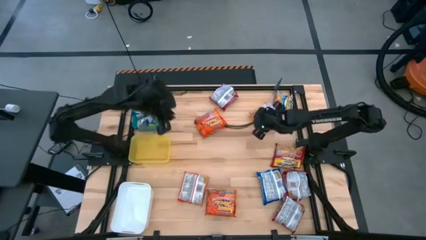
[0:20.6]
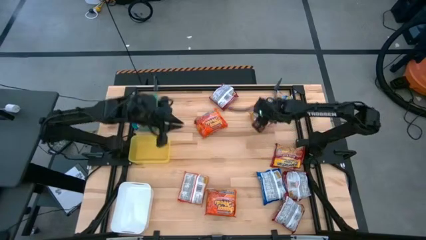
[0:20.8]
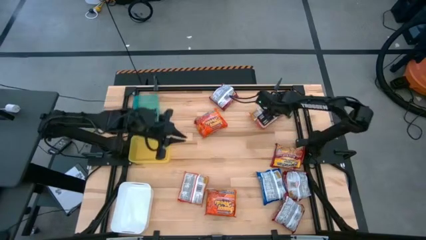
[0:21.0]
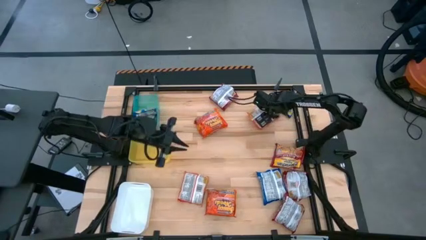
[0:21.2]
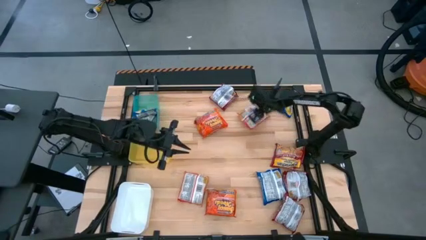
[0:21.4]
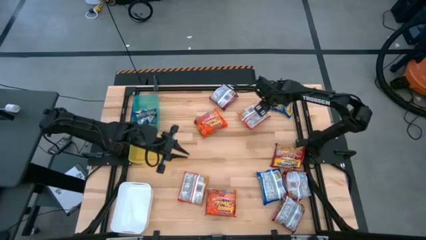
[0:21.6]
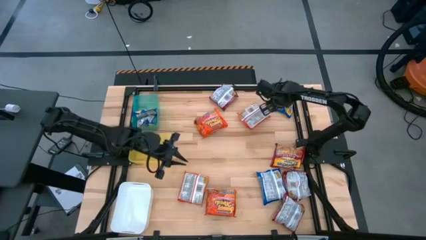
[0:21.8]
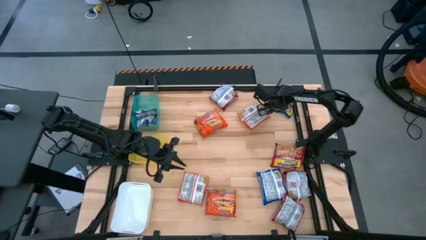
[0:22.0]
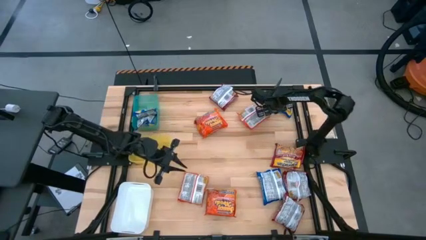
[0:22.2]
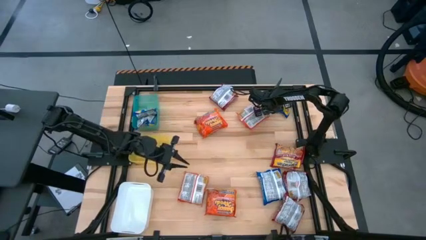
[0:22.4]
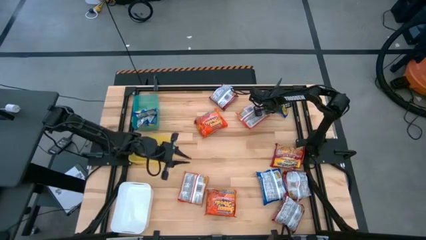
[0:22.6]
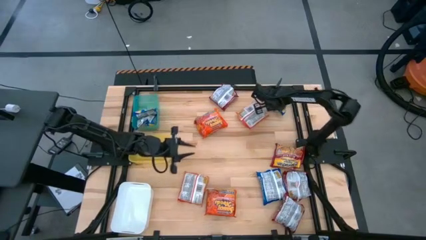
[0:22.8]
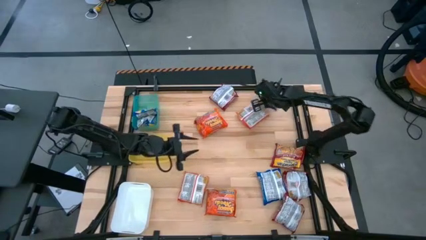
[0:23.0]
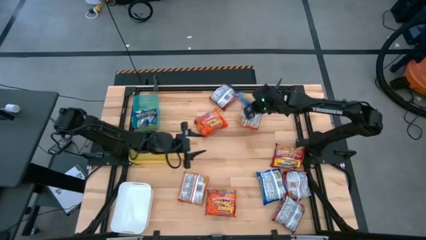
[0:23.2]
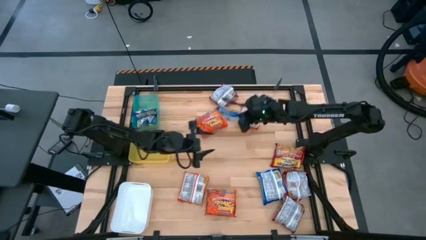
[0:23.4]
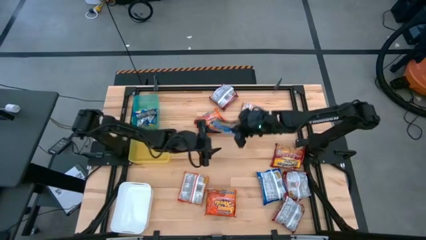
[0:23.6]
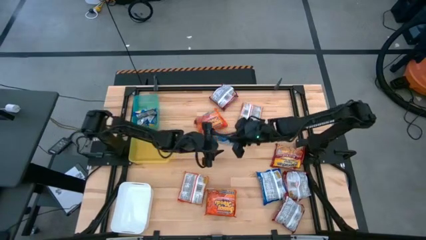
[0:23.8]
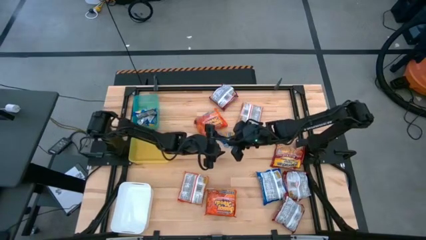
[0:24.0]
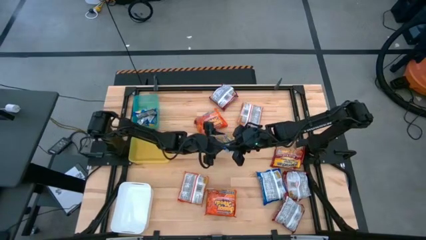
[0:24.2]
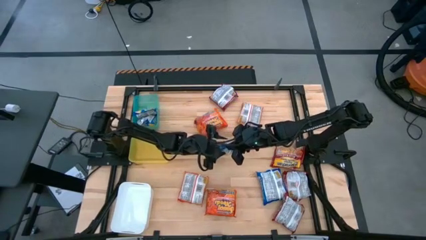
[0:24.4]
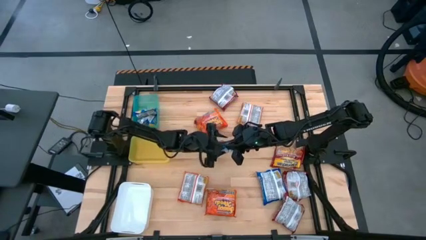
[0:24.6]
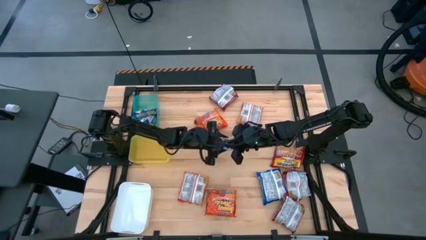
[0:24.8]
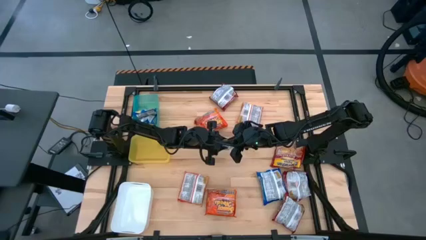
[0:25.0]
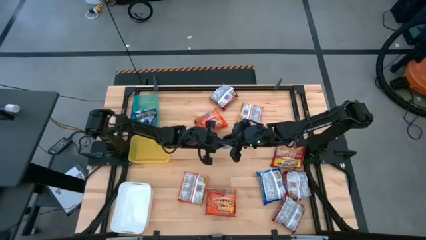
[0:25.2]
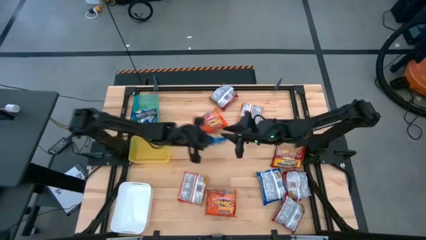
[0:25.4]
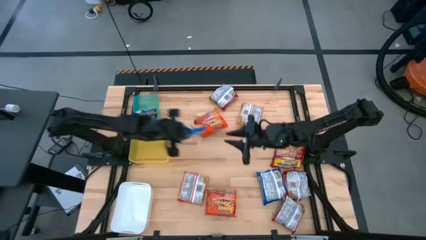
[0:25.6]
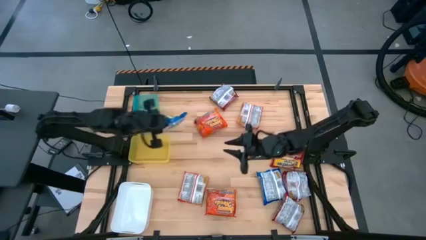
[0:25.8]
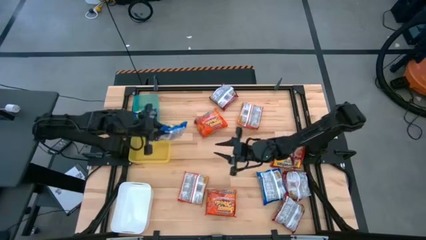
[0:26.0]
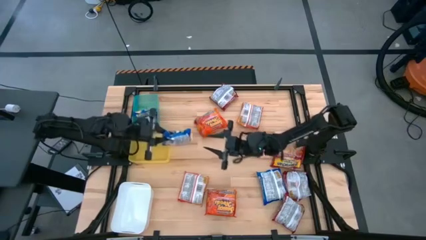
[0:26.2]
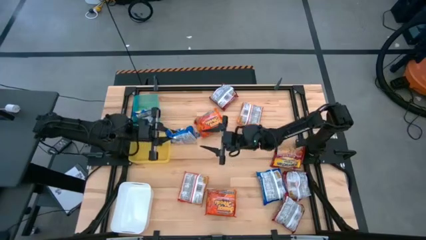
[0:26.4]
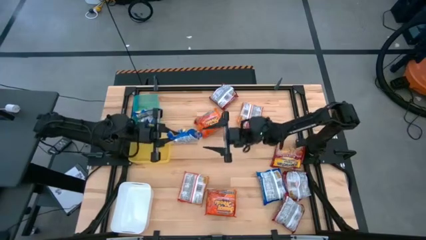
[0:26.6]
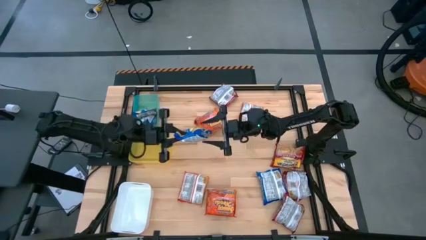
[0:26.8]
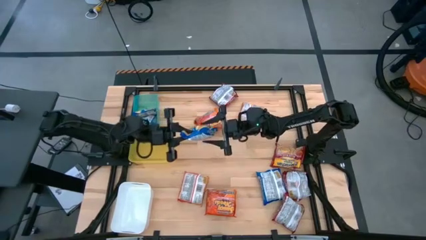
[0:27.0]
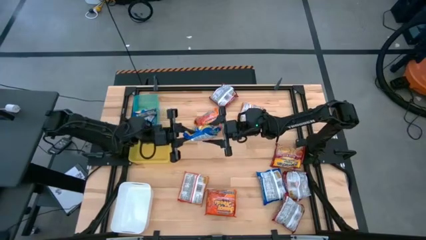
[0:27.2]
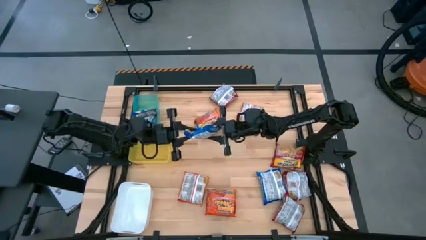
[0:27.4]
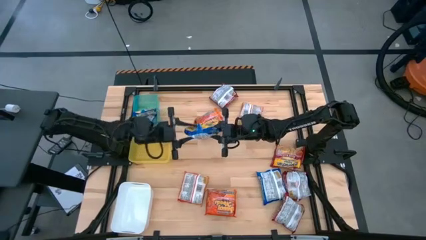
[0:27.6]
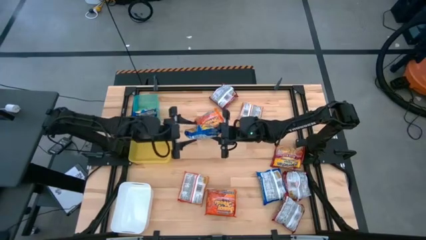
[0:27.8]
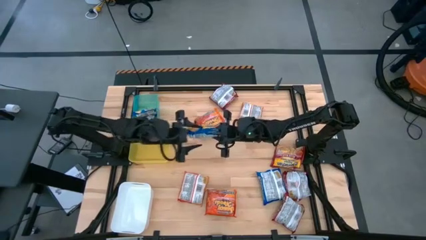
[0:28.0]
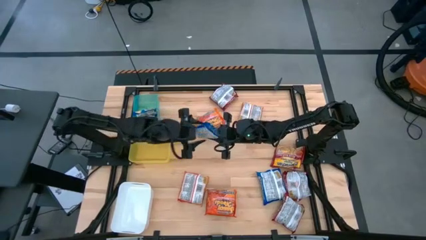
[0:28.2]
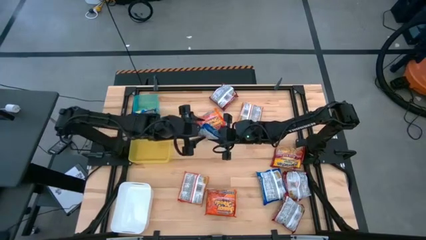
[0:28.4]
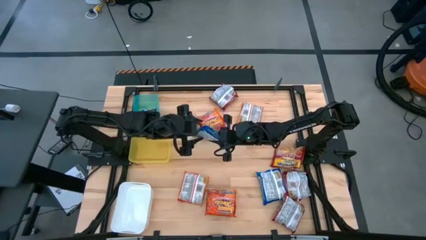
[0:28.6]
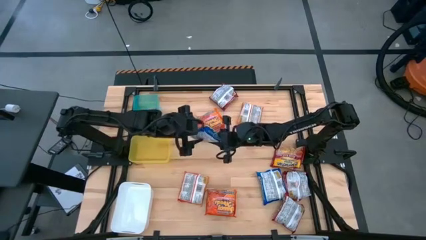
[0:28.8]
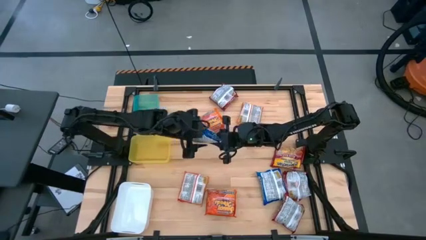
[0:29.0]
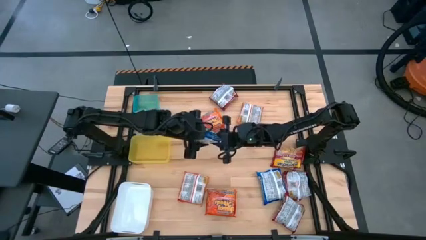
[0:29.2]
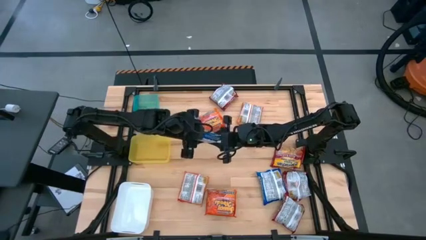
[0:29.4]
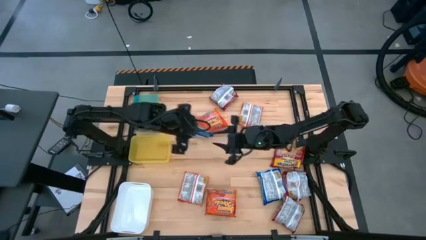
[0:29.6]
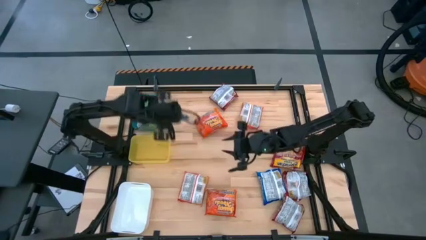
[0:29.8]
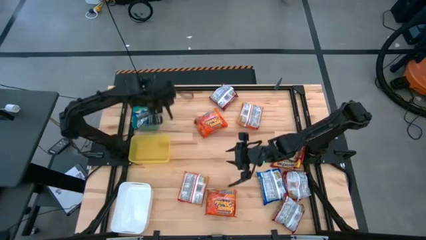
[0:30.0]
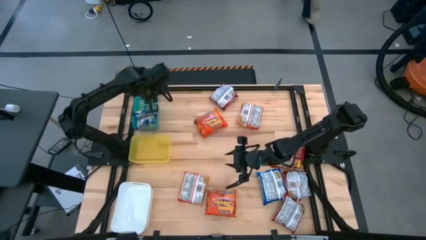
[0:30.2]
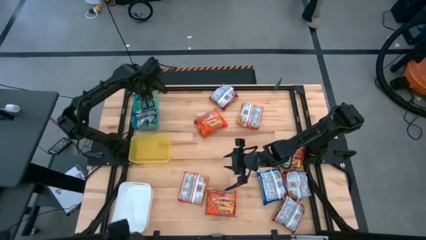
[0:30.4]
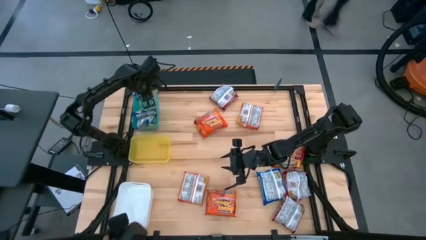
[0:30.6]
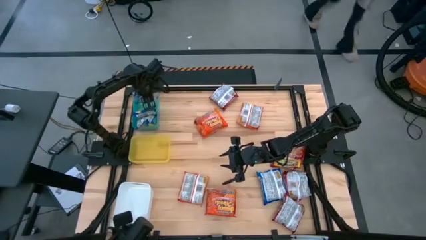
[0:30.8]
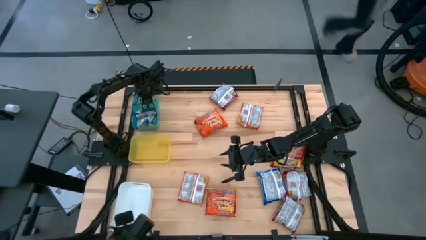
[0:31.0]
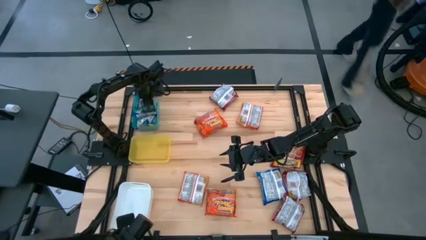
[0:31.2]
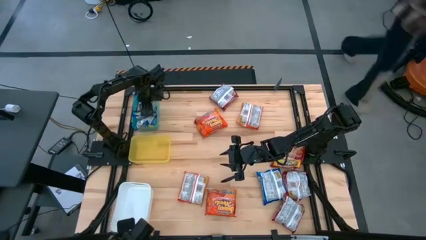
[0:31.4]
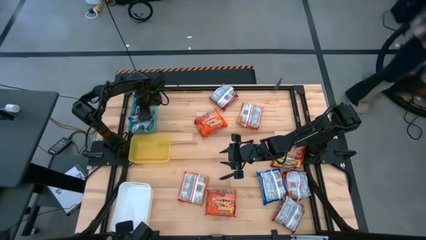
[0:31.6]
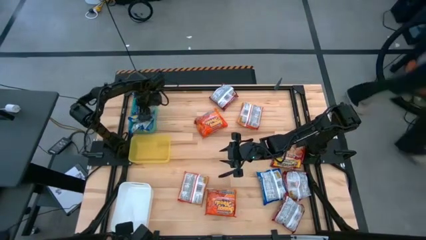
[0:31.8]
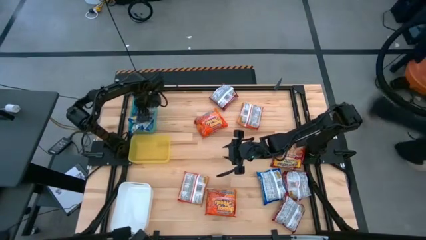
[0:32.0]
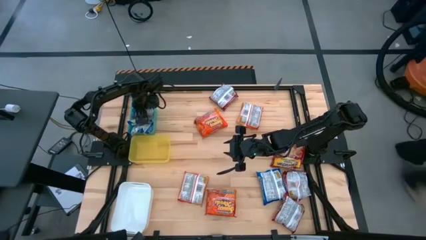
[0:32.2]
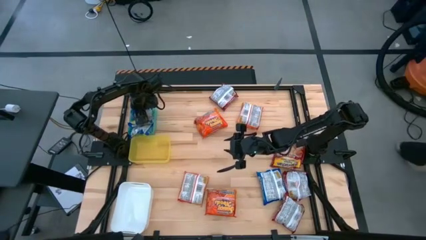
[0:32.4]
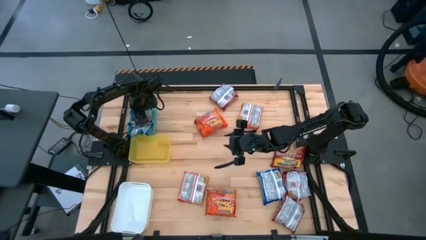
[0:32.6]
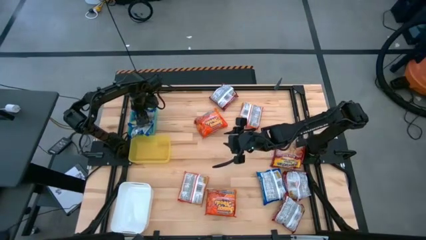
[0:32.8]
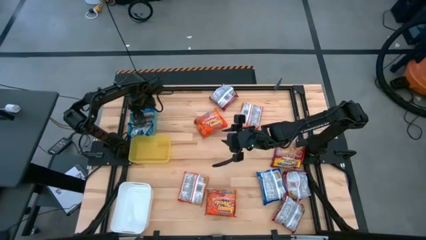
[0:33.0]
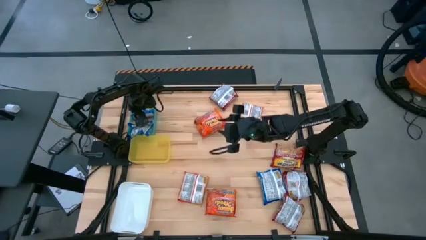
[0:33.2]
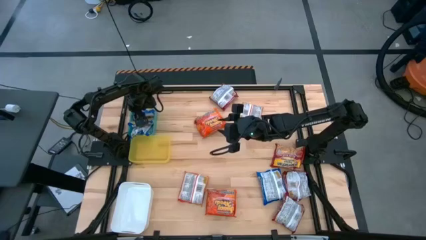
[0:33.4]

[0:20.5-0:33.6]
Task: Sort Maruchan noodles
Put the blue noodle pack into the blue bin

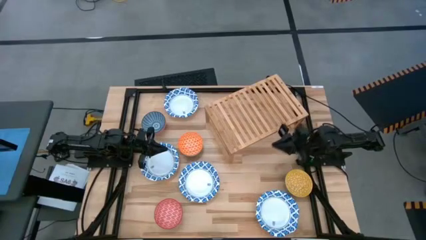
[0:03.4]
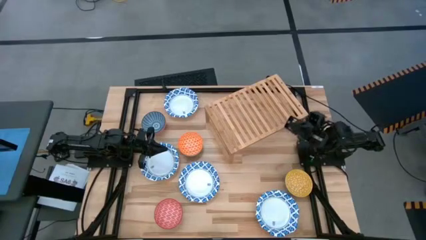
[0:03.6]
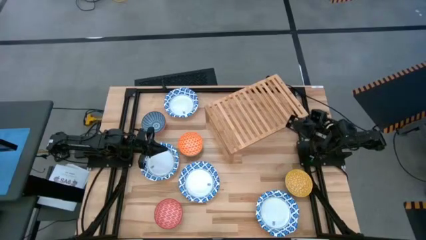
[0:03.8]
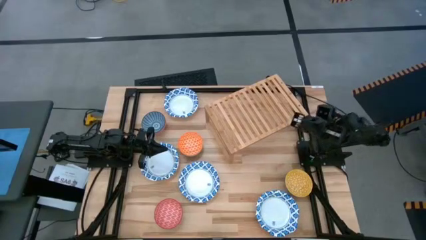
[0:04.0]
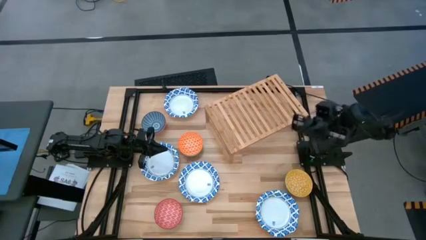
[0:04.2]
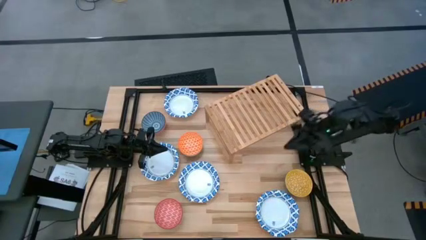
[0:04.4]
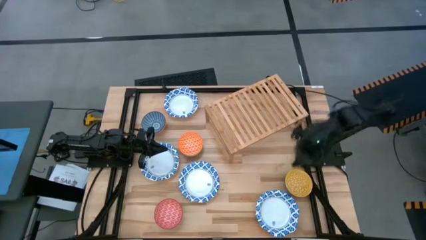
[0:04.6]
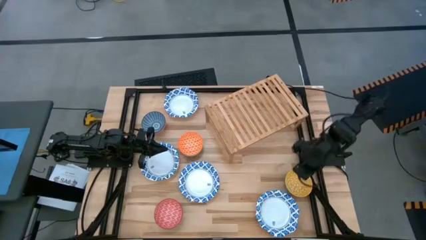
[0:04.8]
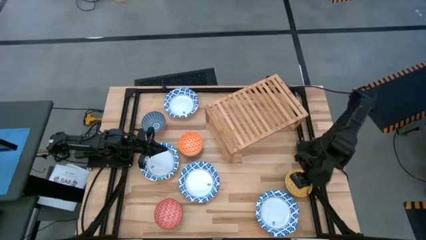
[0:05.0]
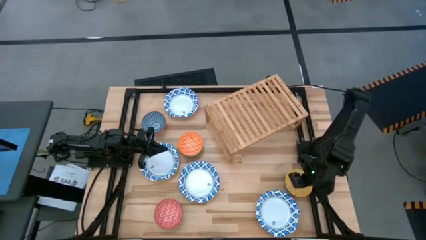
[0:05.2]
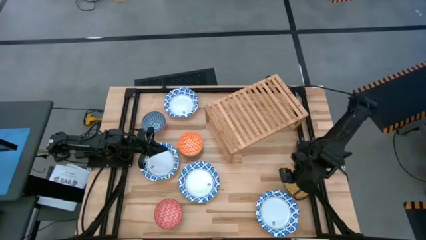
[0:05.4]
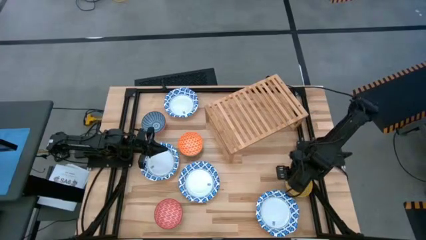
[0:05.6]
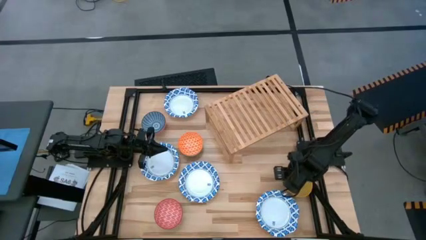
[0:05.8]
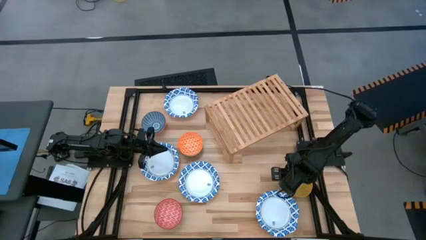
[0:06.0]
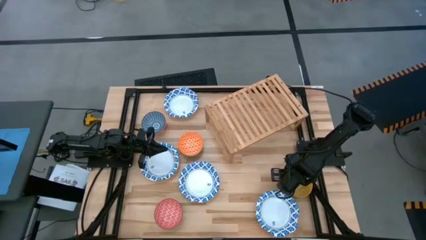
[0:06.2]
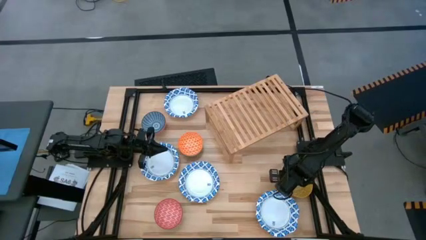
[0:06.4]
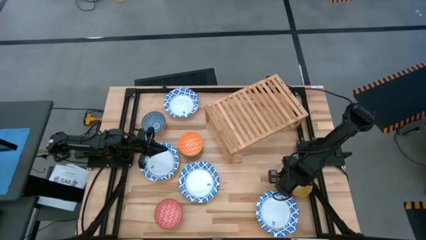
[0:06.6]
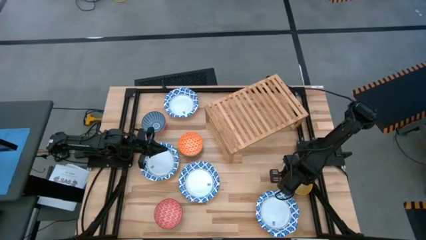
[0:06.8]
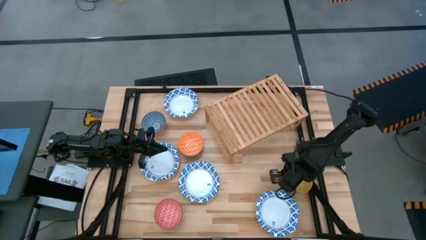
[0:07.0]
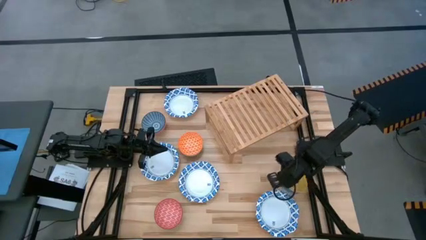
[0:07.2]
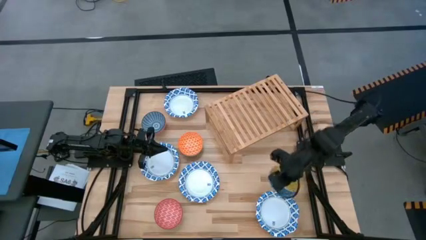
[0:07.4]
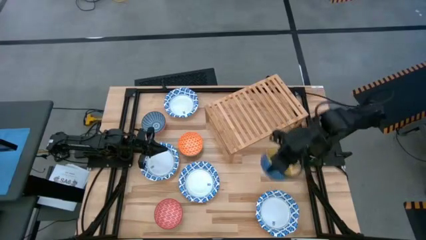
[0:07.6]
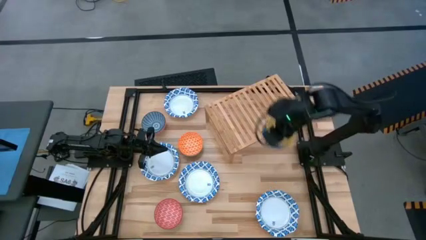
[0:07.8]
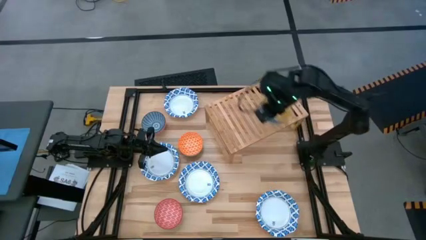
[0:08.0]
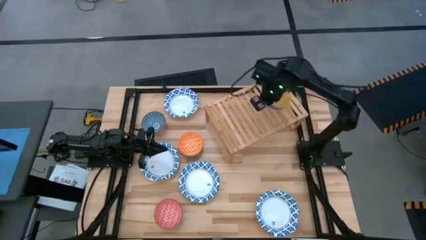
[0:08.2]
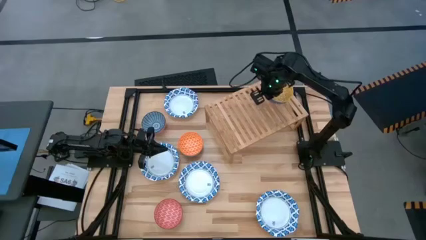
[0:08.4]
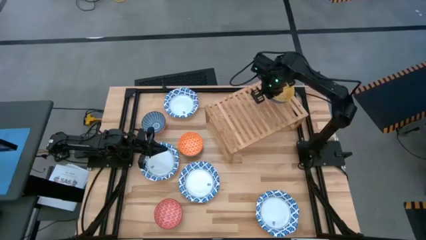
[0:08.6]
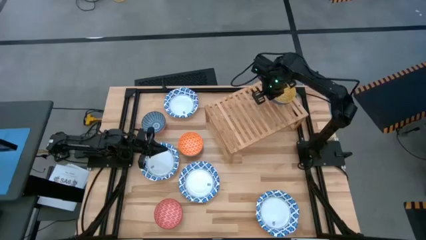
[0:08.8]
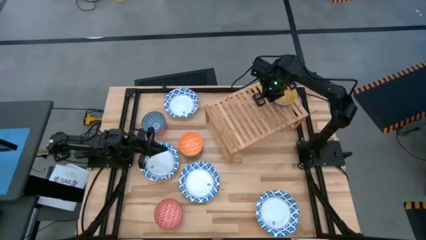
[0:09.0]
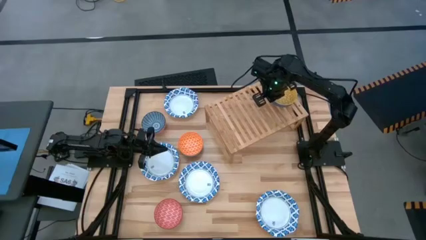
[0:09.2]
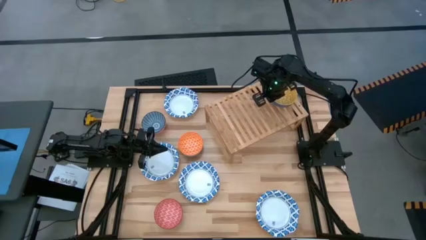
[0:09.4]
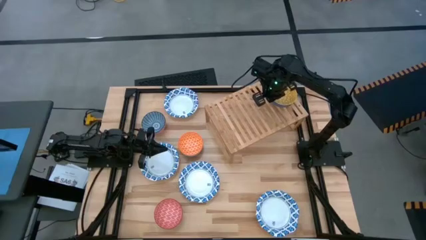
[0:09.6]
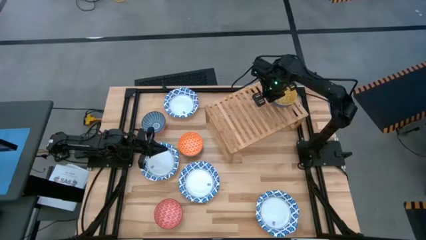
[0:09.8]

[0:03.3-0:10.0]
Task: Place and stack bowls onto a shelf
Put the yellow pattern bowl on the shelf
